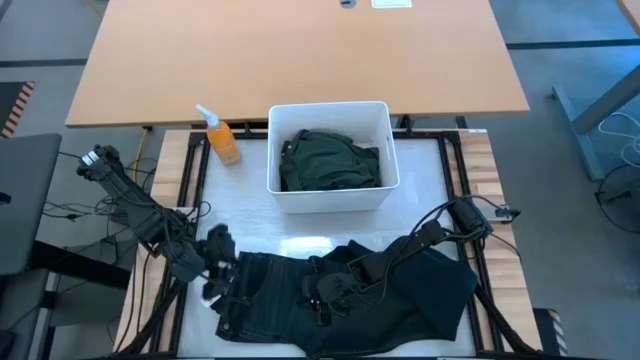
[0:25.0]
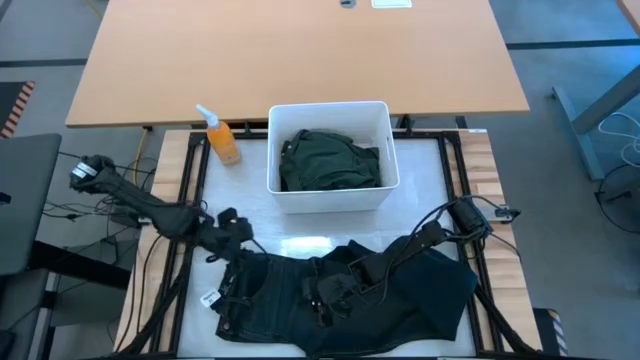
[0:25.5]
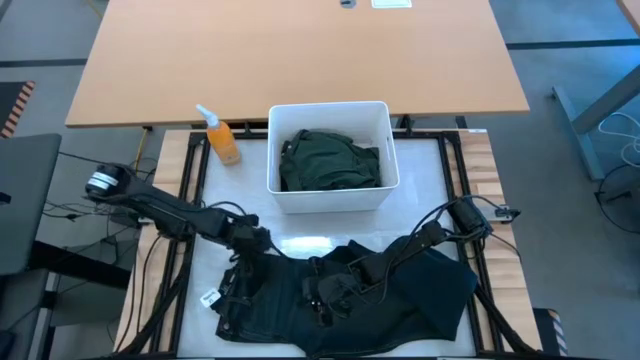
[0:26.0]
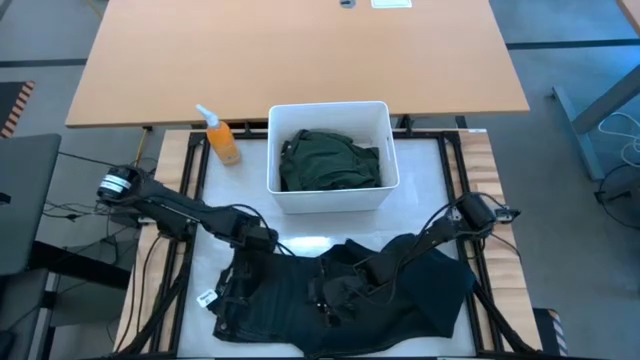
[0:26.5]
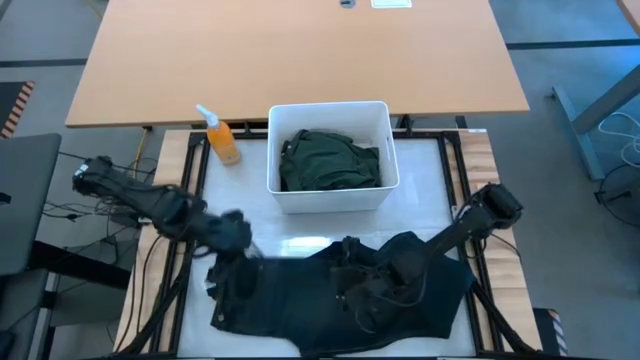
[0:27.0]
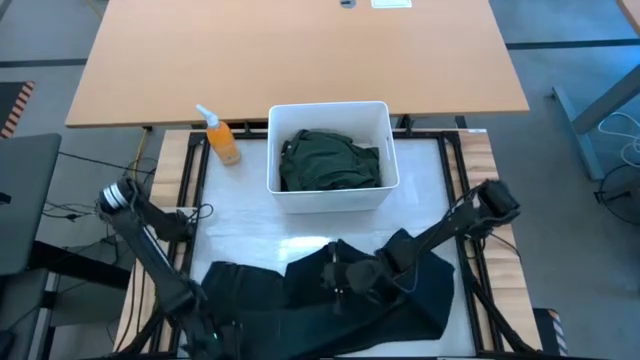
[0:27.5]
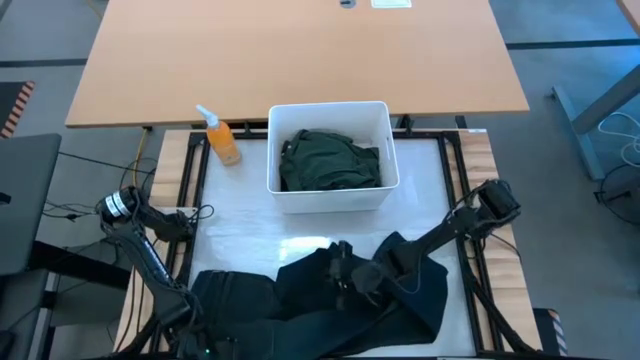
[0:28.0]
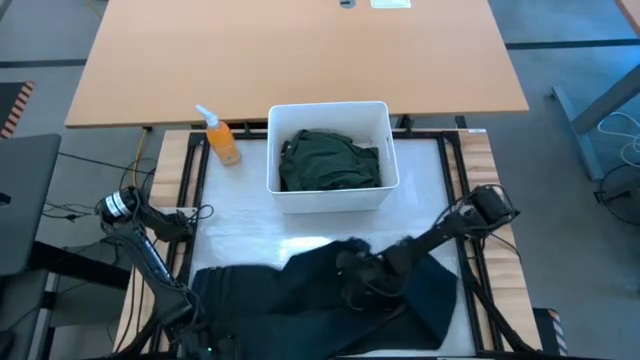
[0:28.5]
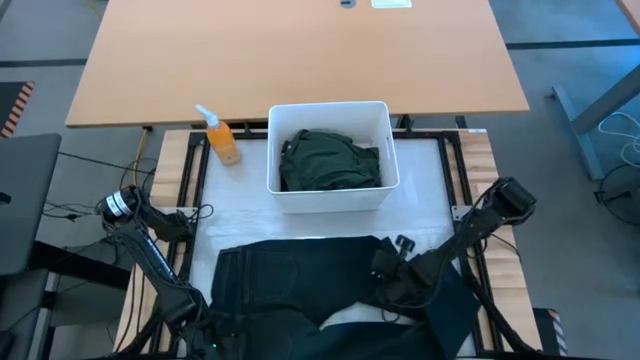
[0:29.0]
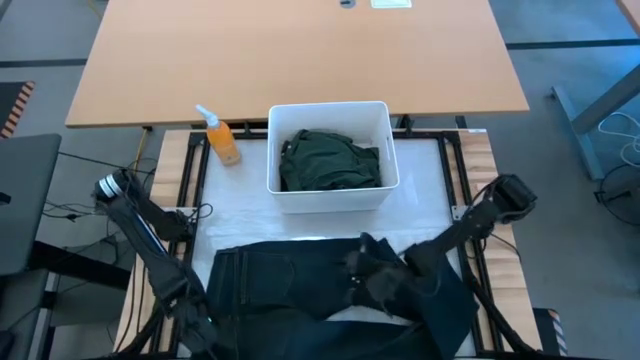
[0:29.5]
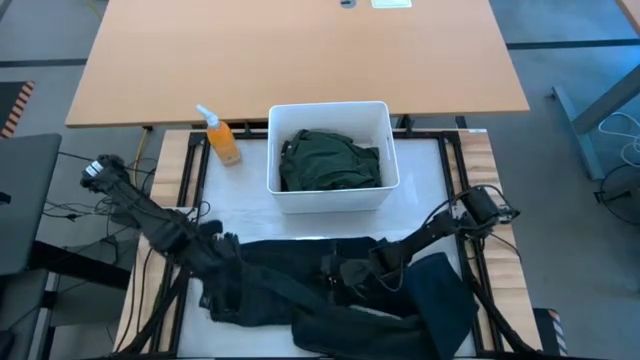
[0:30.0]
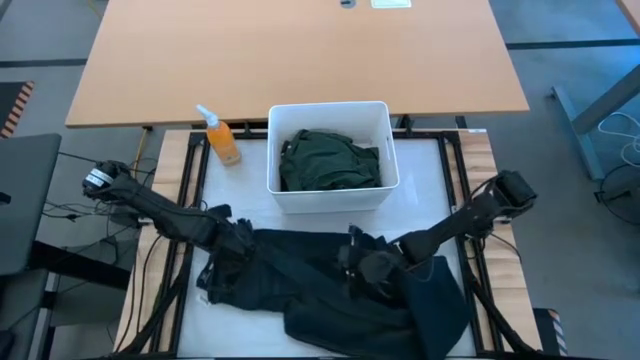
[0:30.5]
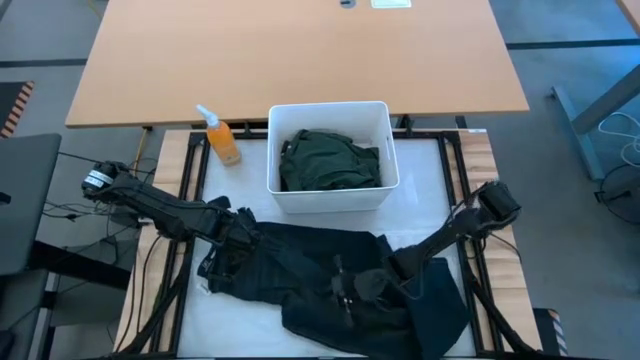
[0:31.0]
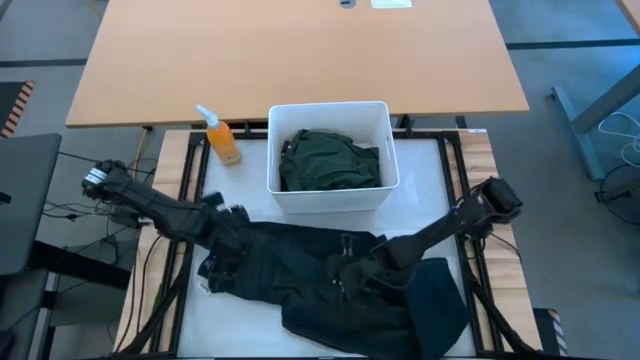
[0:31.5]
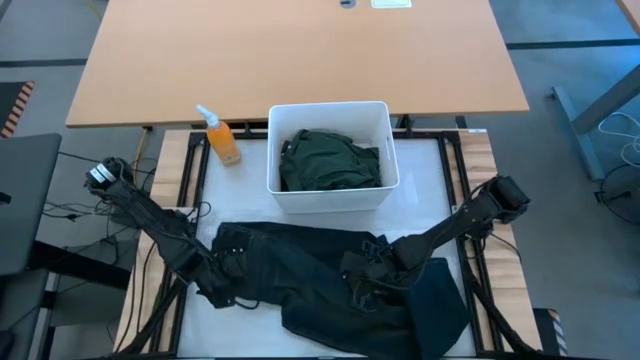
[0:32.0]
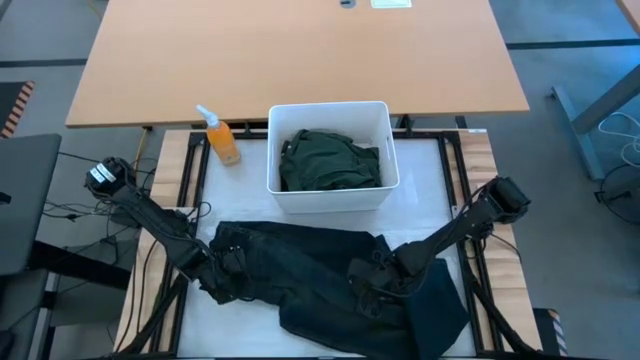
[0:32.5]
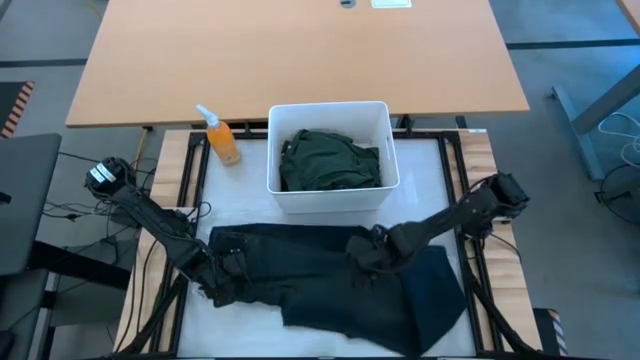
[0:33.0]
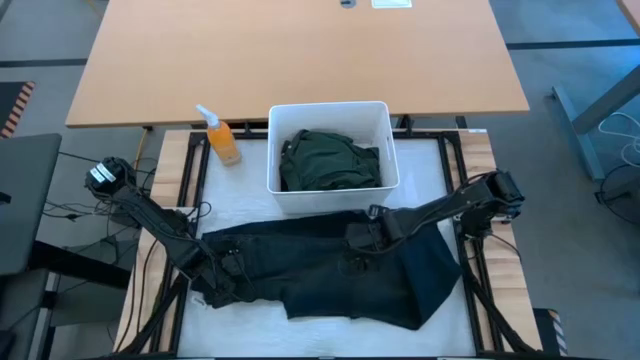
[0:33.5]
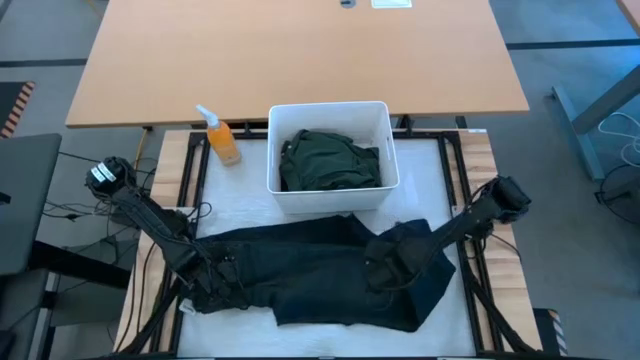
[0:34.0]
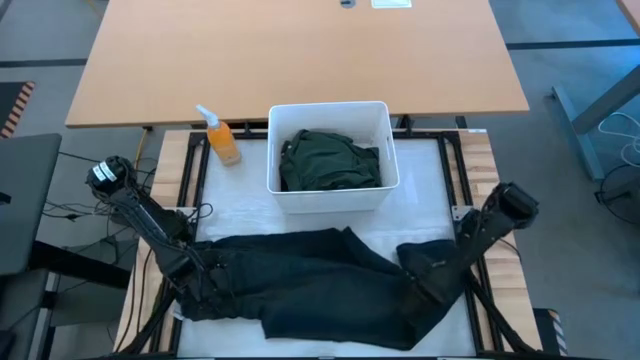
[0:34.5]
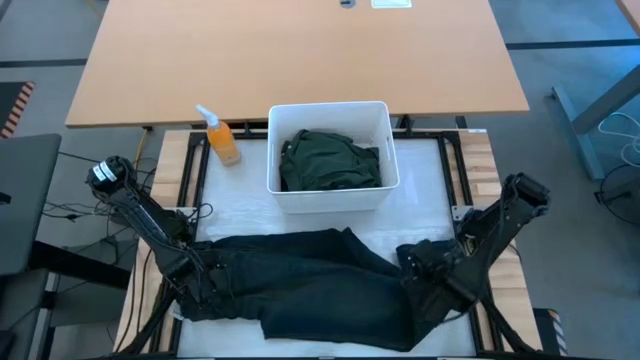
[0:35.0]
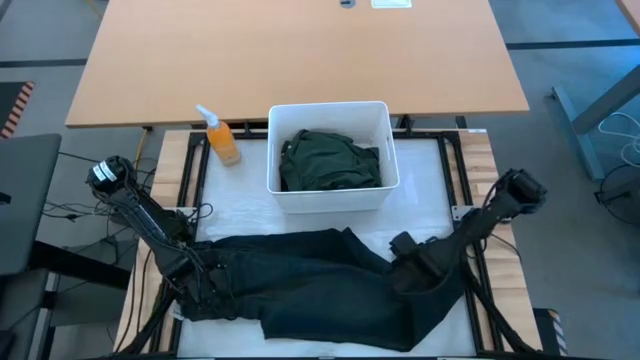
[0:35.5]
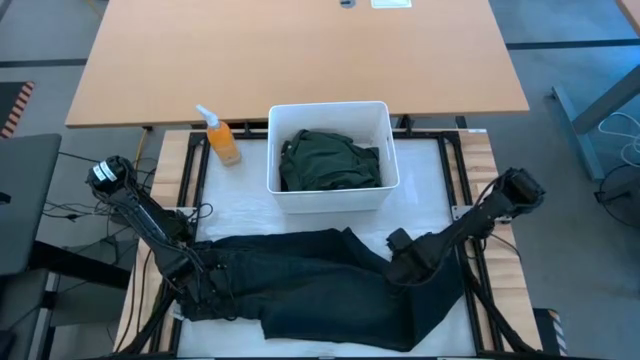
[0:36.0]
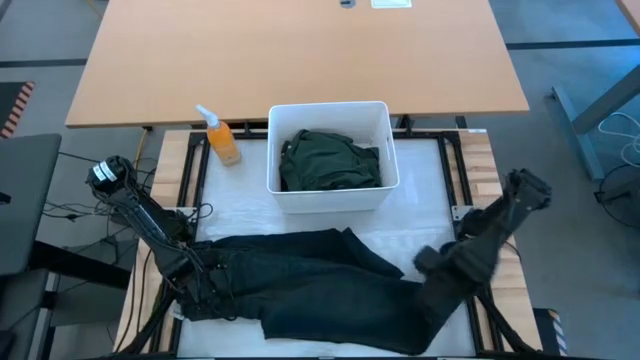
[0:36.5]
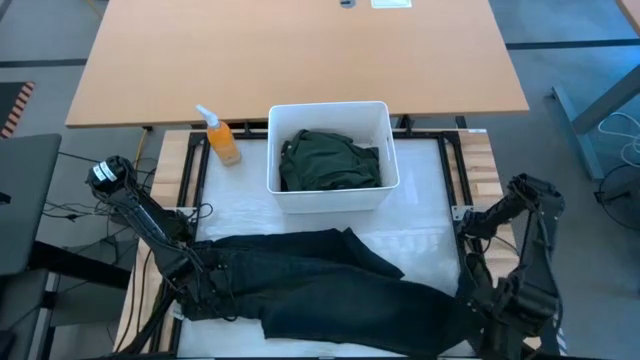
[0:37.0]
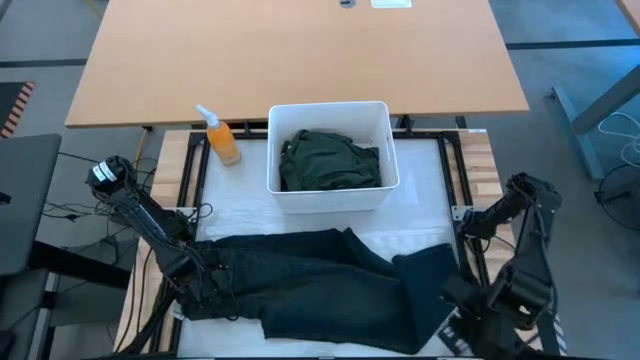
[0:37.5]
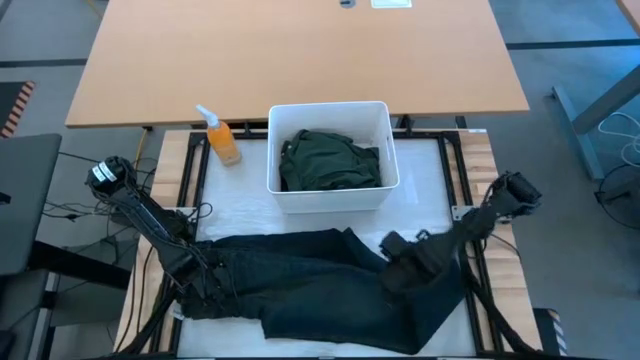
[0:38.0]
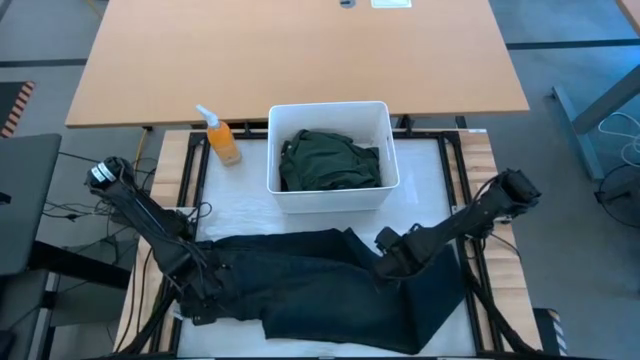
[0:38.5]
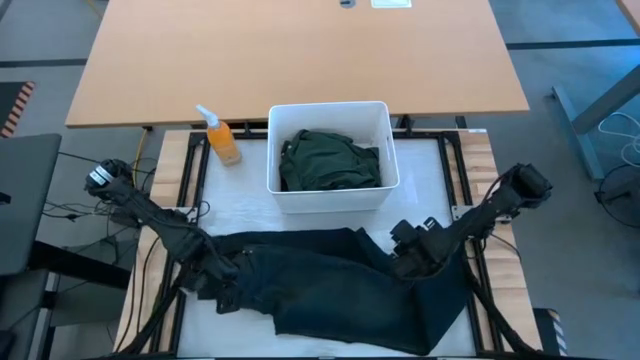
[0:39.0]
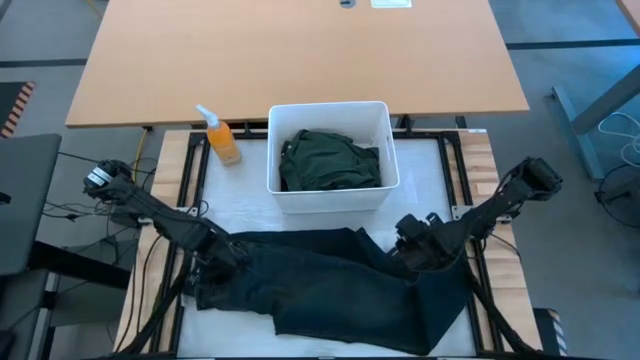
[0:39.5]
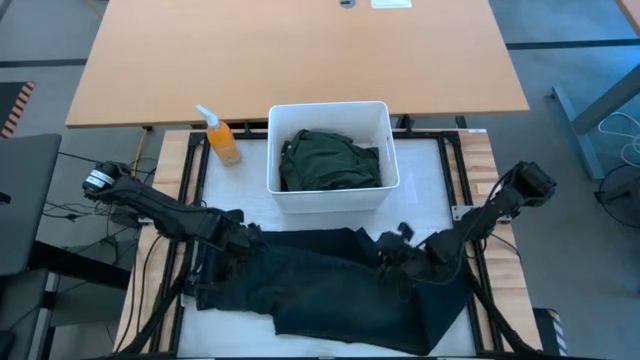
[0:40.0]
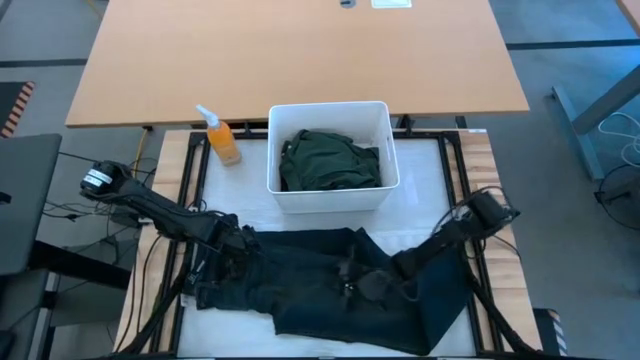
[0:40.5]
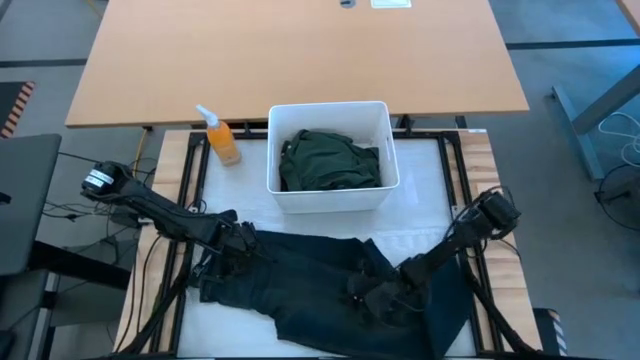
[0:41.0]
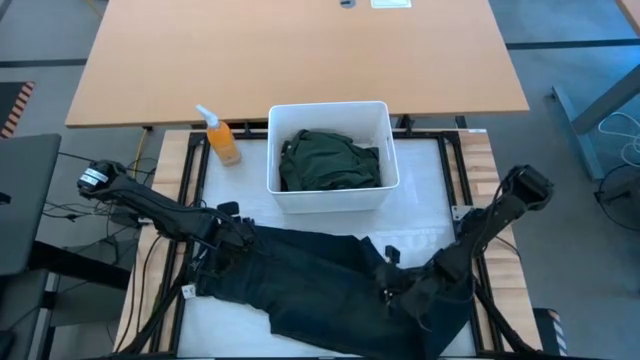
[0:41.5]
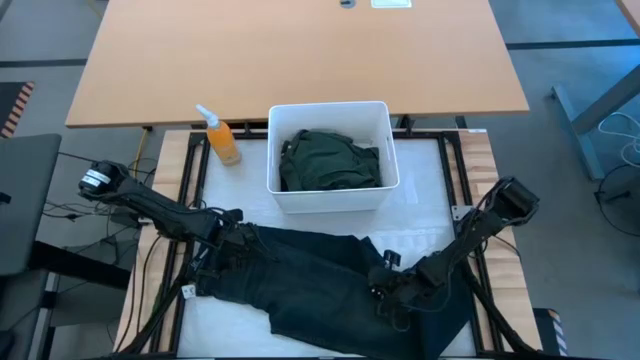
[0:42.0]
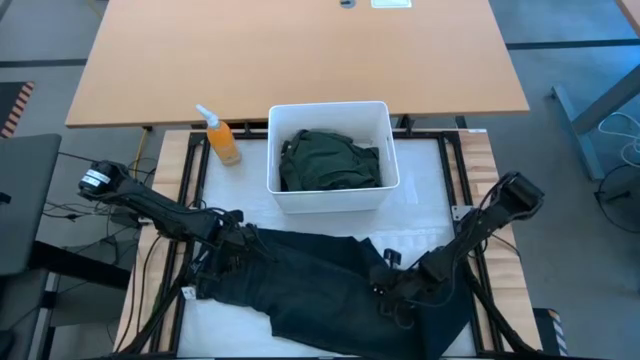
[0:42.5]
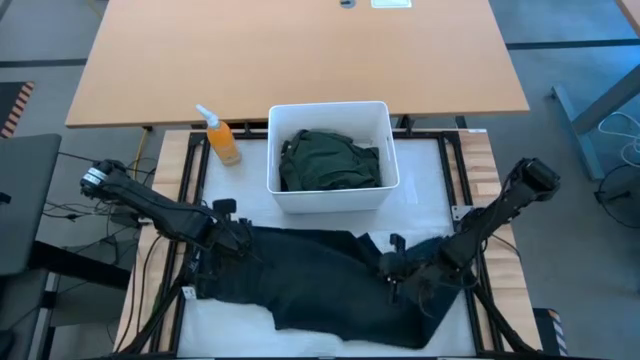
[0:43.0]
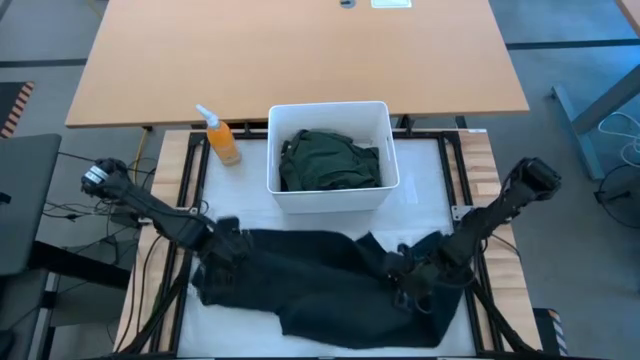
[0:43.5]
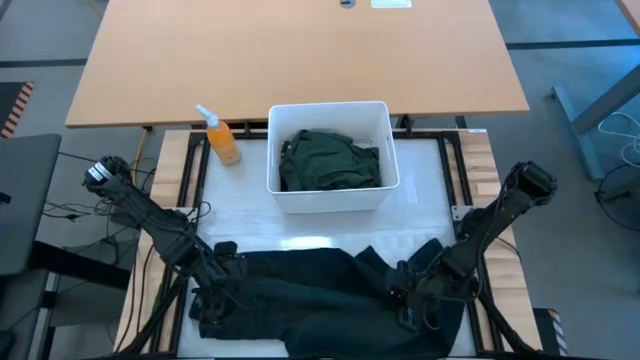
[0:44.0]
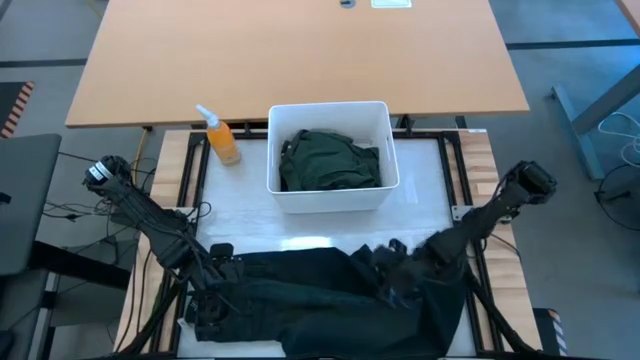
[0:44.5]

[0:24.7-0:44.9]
Task: Fold laundry
Fold the dark blue jeans
